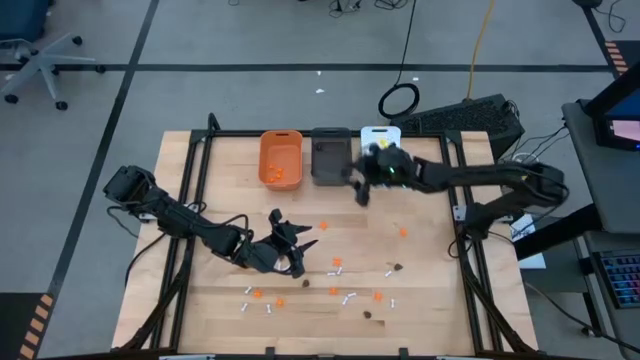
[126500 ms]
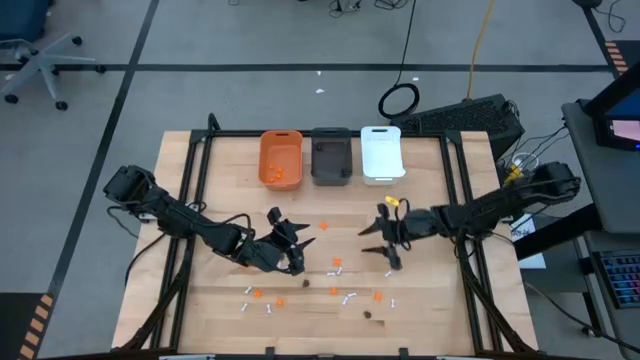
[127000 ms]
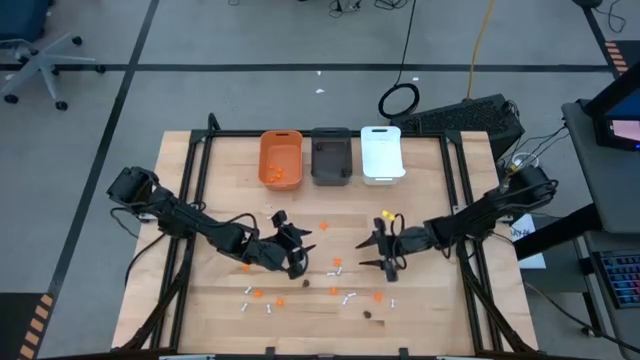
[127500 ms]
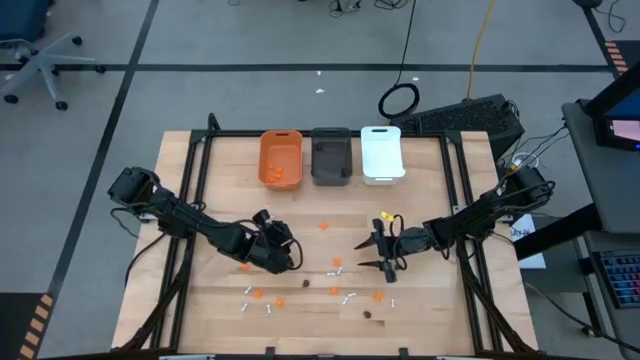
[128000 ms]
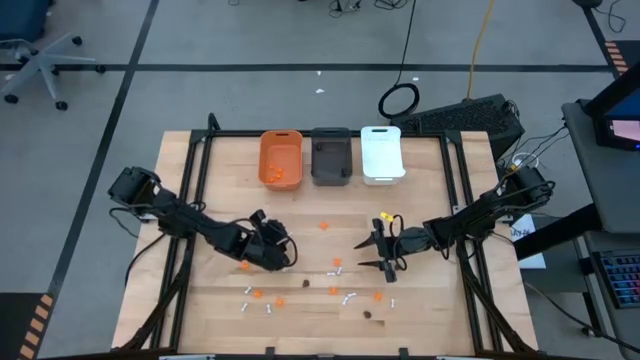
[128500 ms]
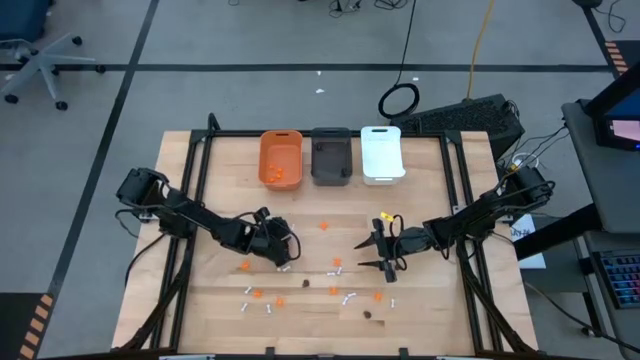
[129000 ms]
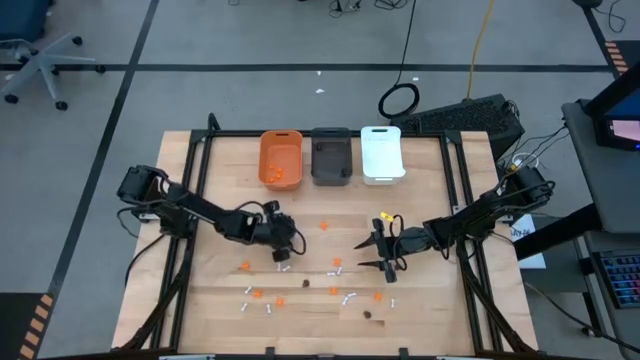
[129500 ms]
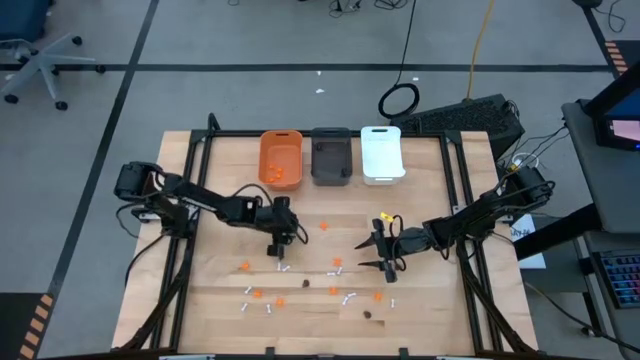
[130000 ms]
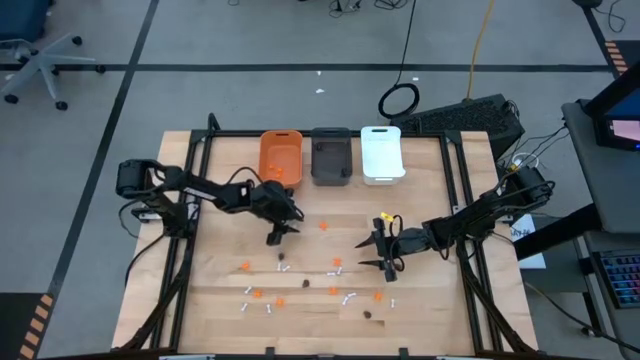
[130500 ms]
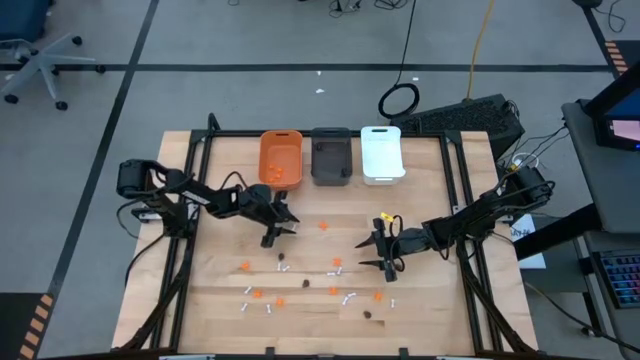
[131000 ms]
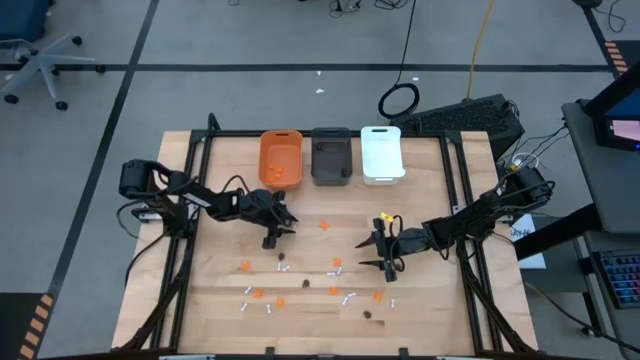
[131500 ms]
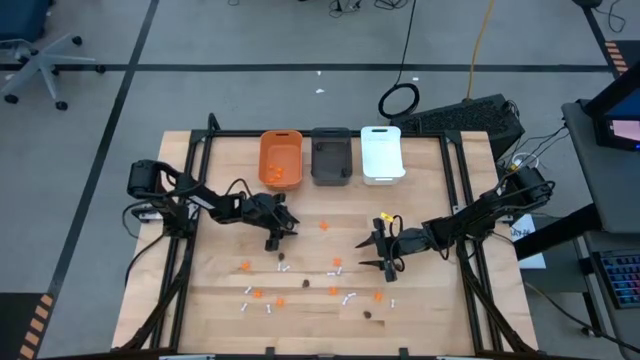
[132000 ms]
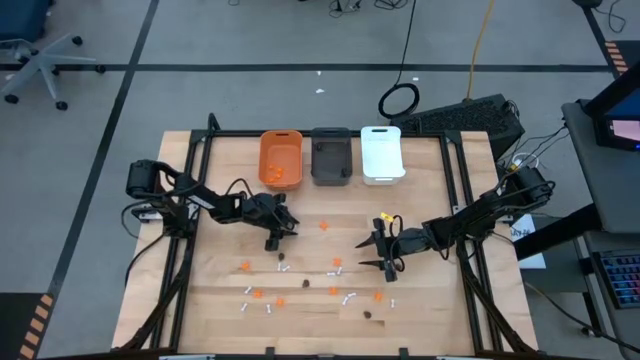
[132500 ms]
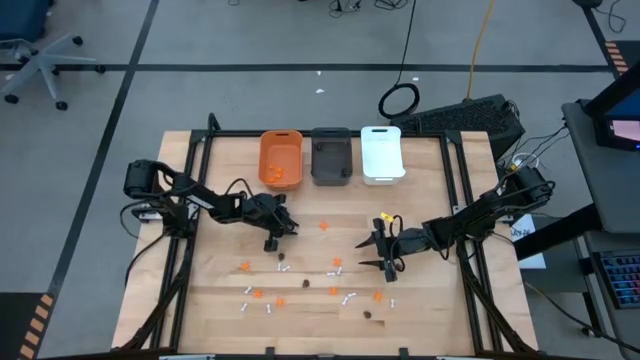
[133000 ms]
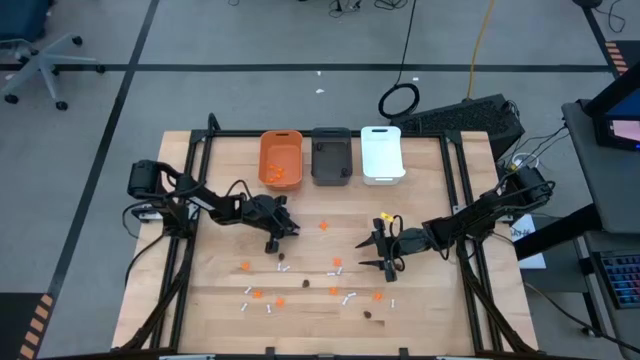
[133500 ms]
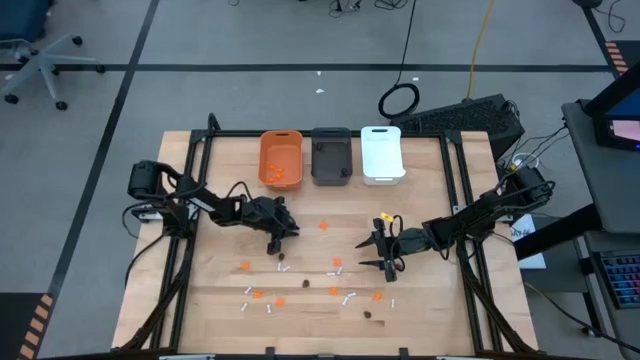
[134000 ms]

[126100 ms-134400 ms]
Task: Sort Halloween decoration
Put the white bone toy into the white bin

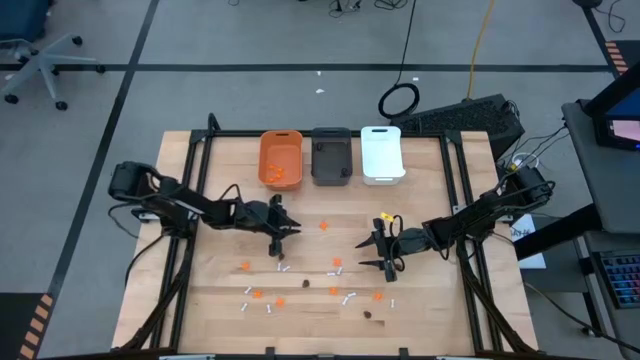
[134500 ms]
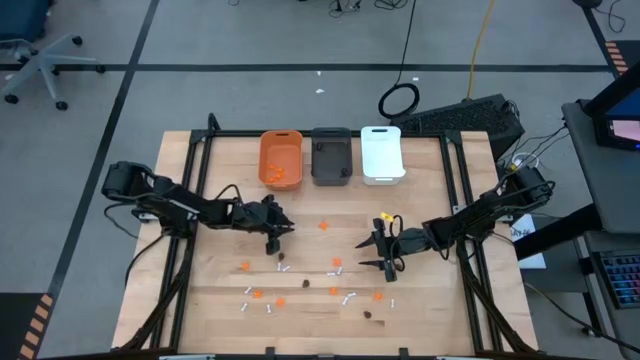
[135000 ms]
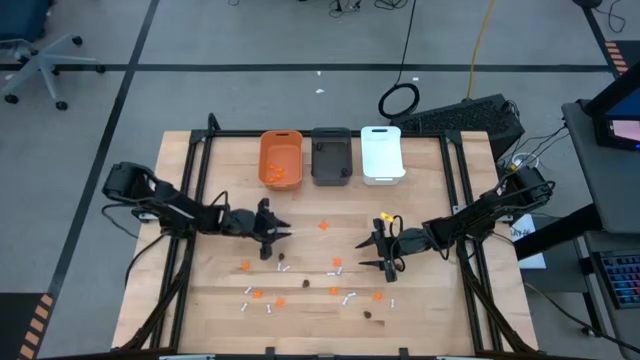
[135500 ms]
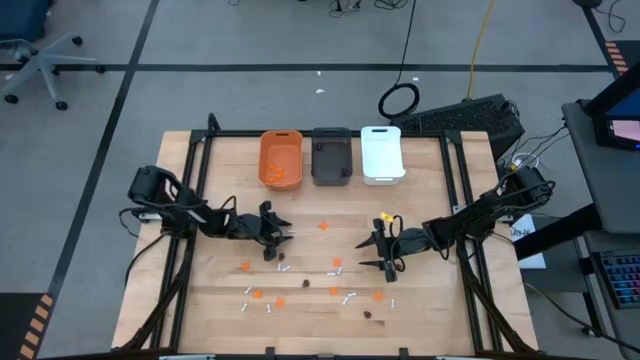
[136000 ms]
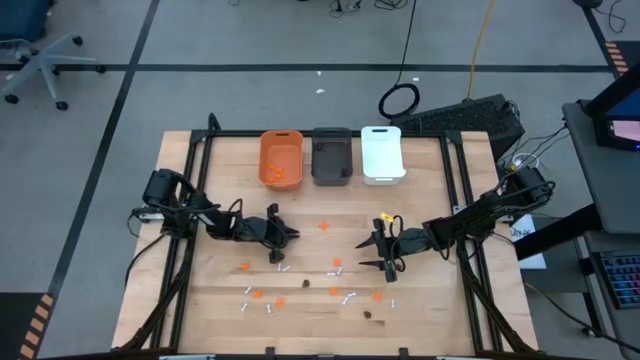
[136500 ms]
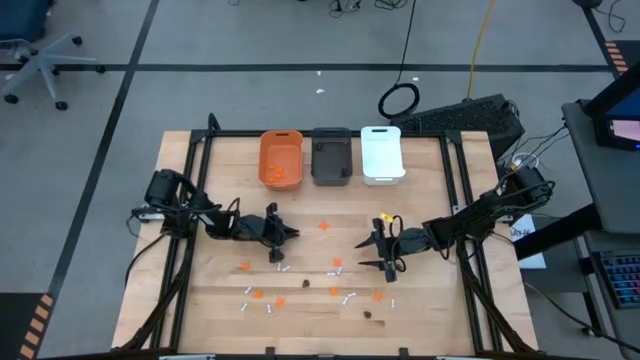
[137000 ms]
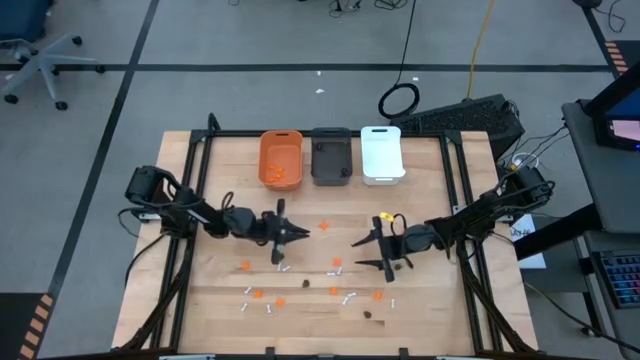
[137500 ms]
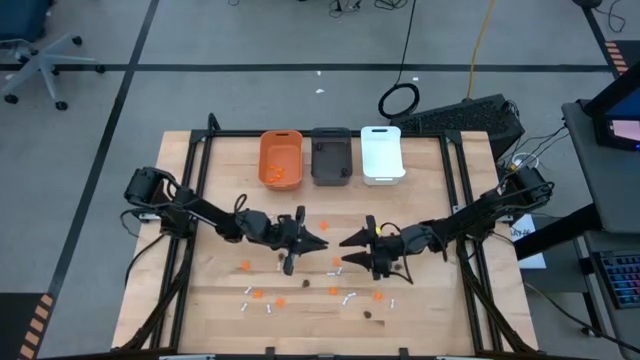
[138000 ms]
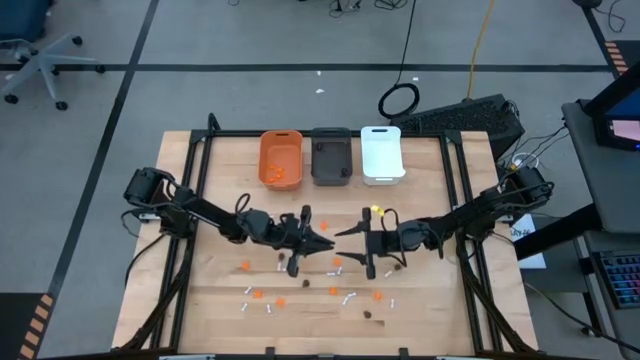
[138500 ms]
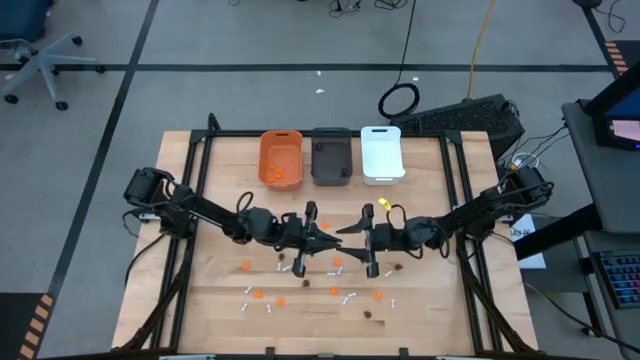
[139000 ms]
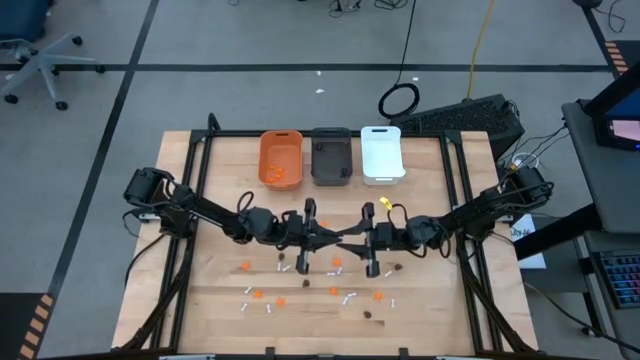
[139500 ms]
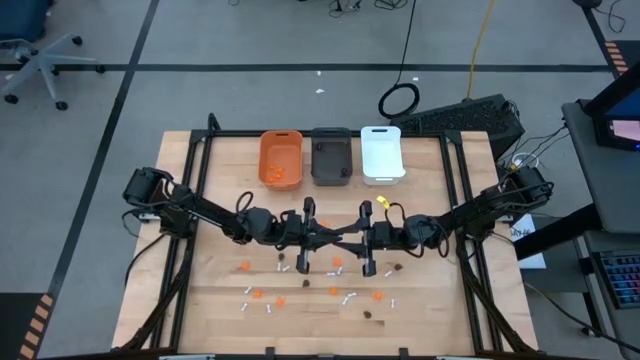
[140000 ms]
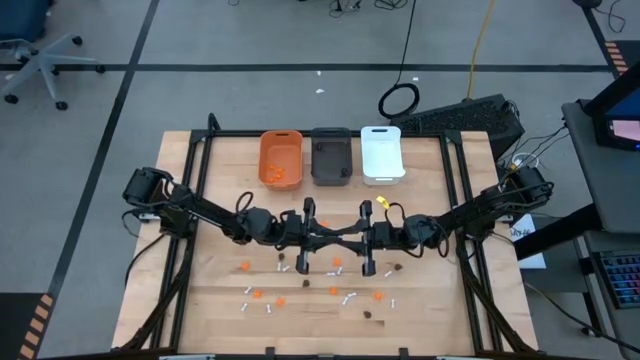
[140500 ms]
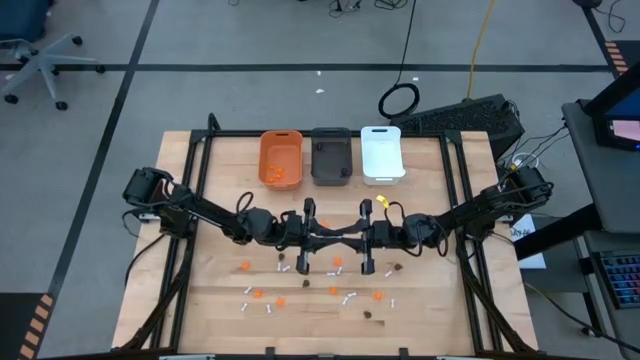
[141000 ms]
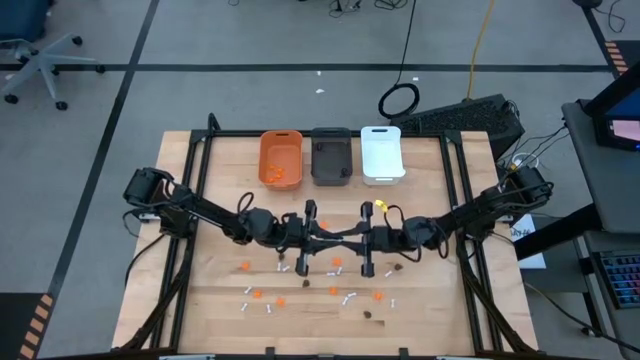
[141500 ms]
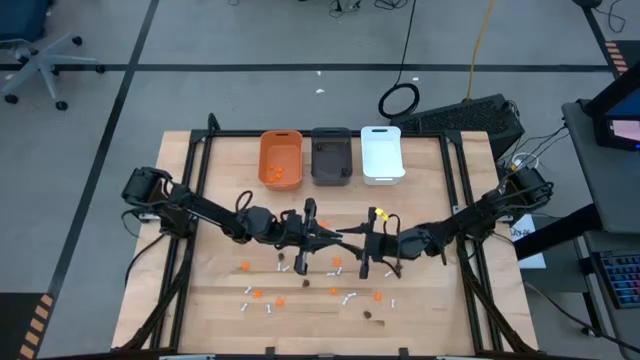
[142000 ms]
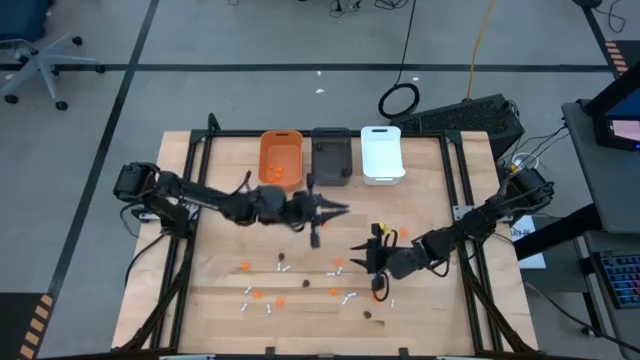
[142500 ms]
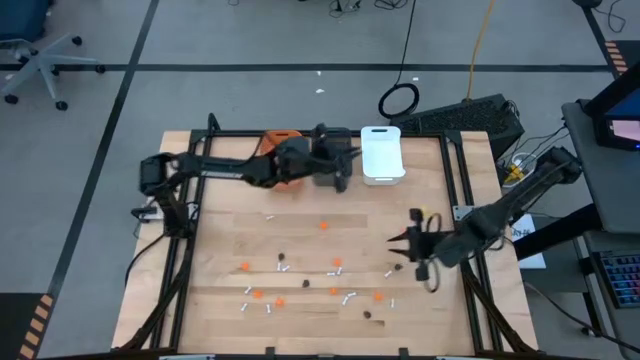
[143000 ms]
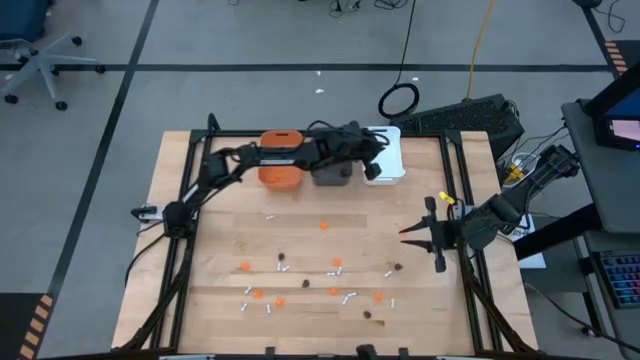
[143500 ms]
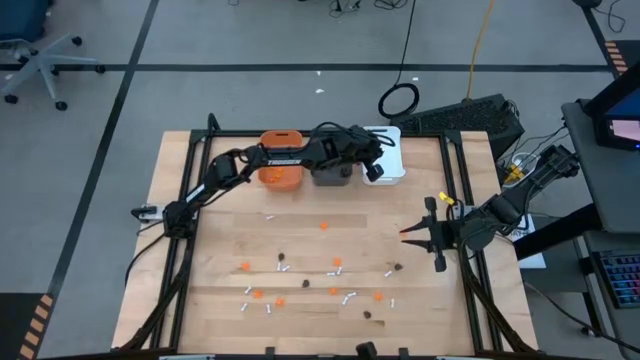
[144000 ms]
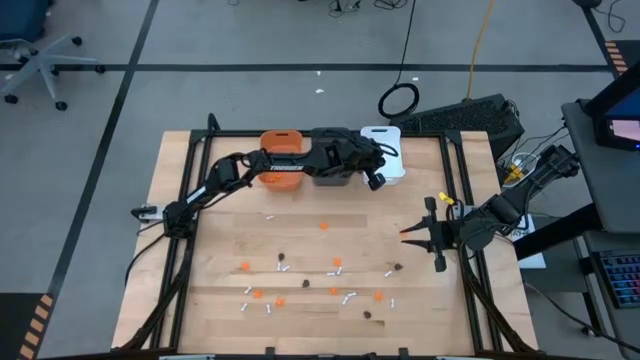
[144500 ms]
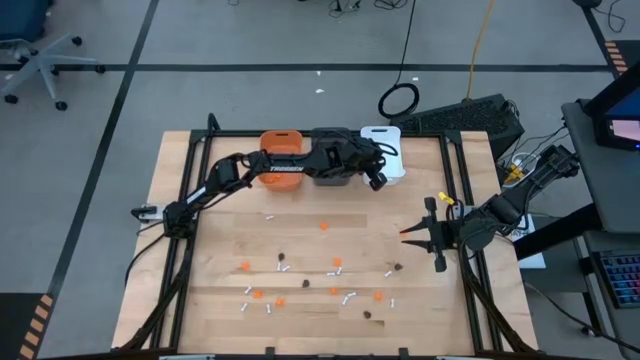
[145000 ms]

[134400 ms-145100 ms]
Put the white bone toy into the white bin
